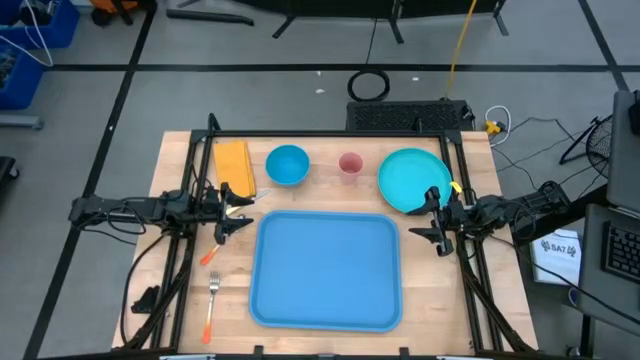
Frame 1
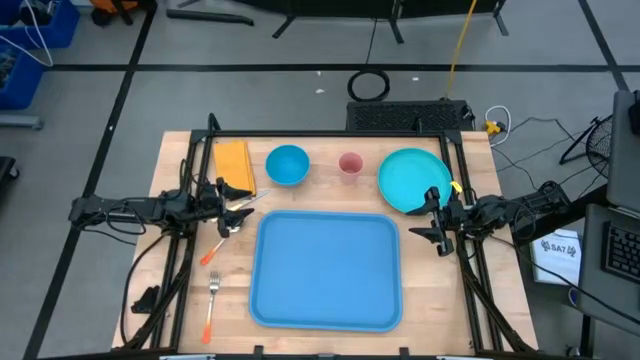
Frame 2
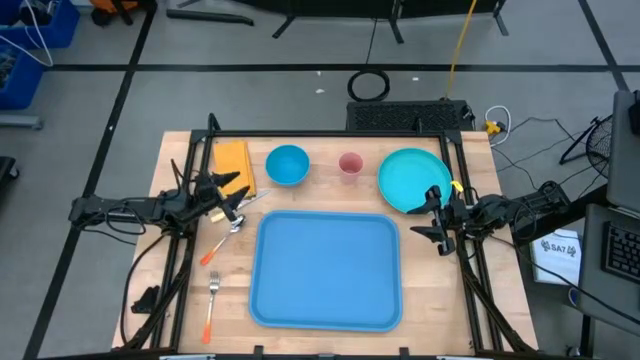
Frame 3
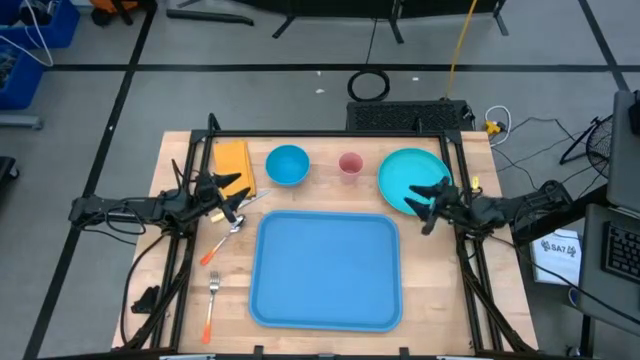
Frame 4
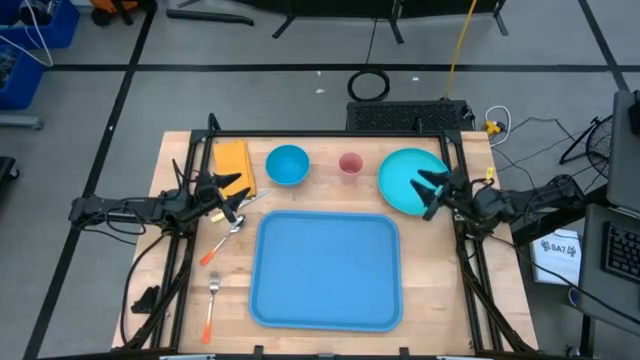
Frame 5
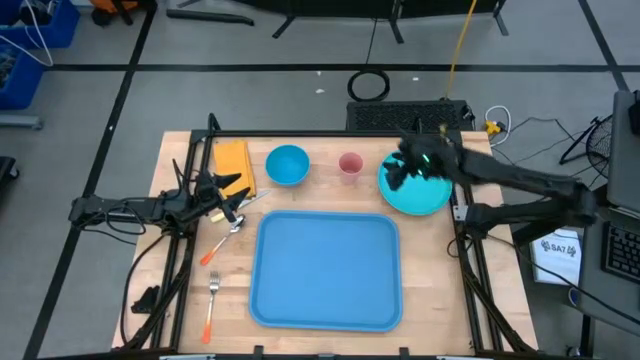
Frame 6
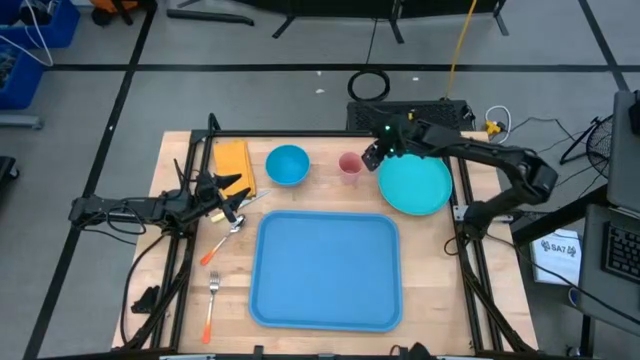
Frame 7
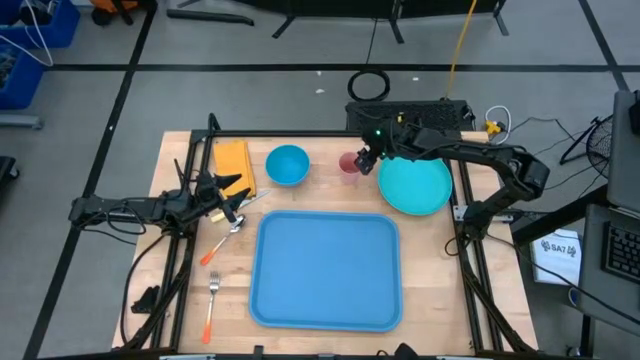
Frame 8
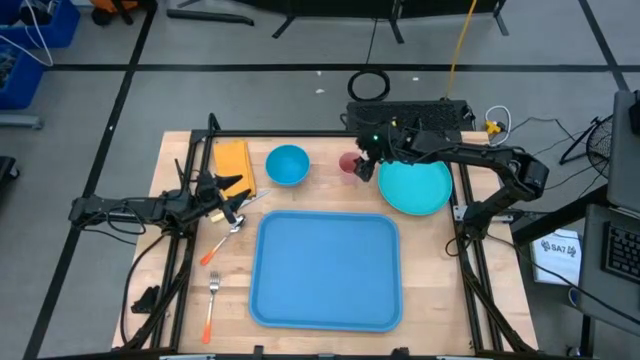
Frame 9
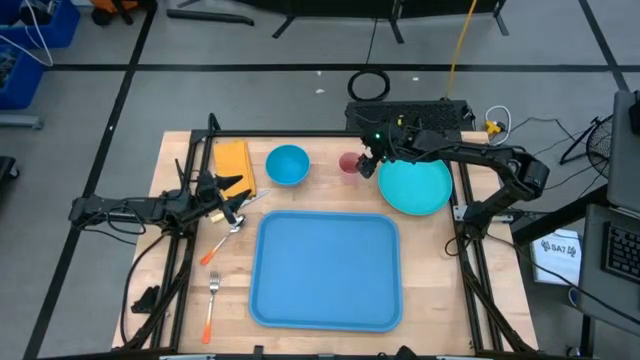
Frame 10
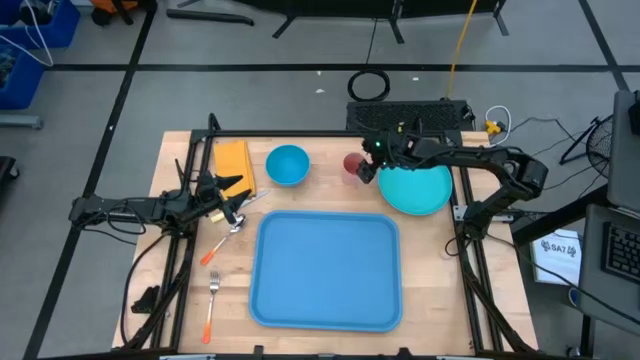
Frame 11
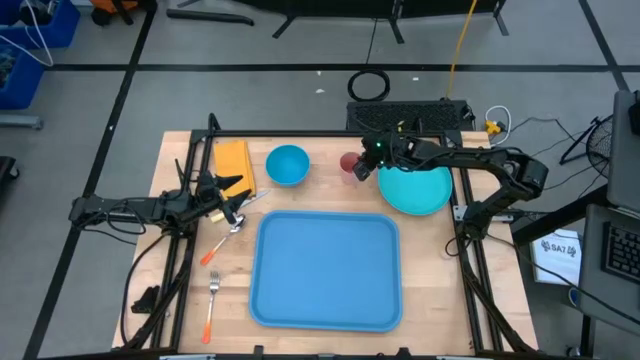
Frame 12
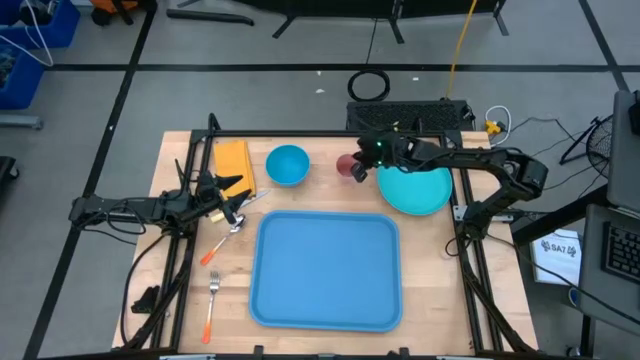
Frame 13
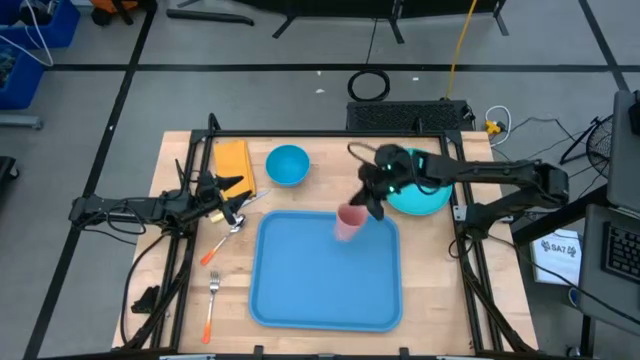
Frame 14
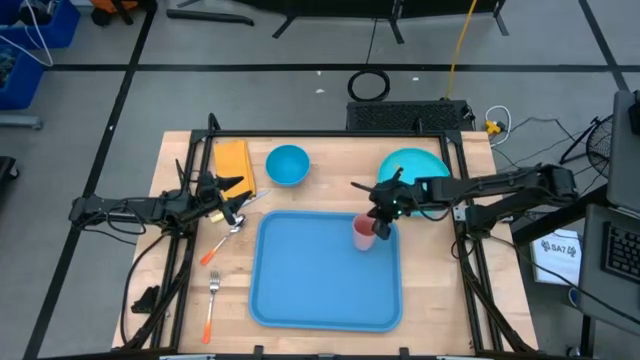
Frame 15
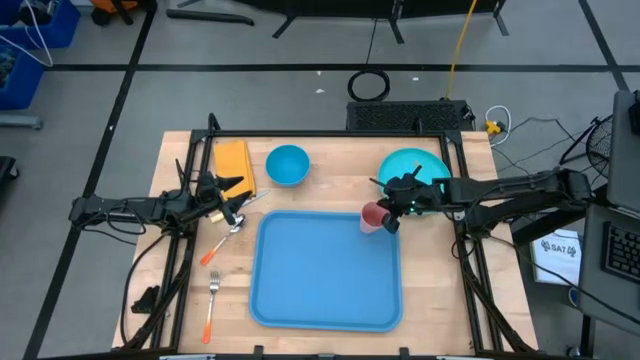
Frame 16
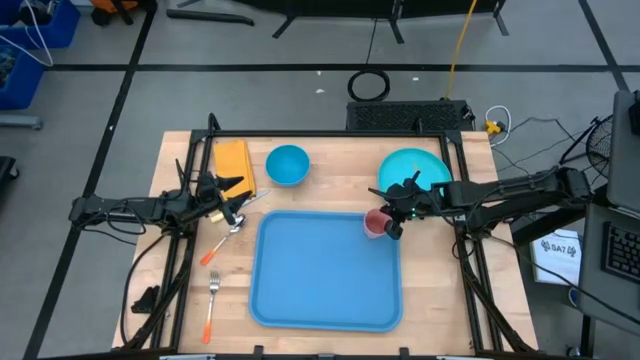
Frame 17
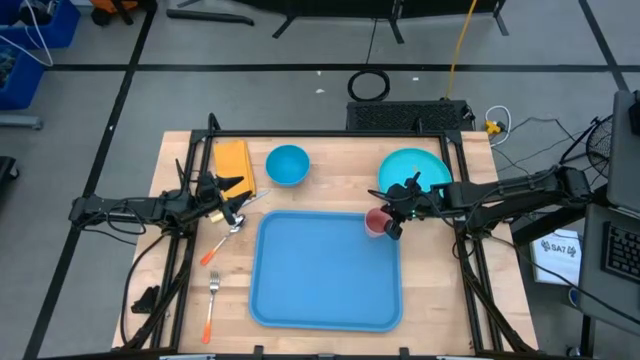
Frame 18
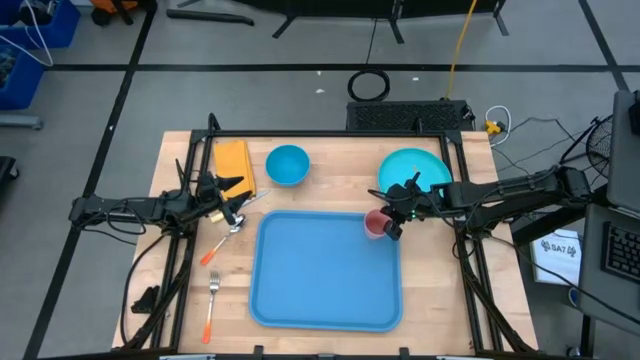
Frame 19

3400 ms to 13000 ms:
Task: Set up tray
Put the pink cup on the blue tray

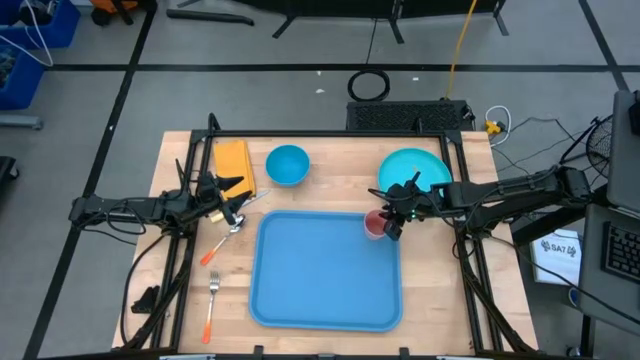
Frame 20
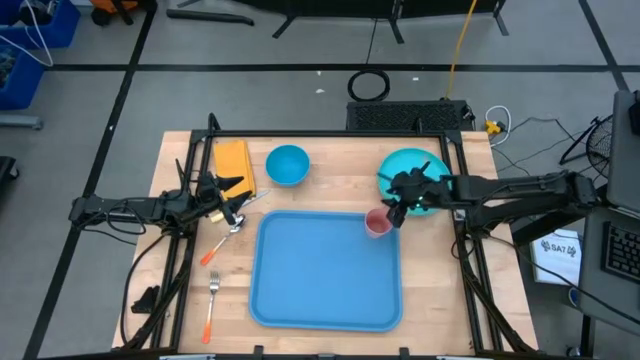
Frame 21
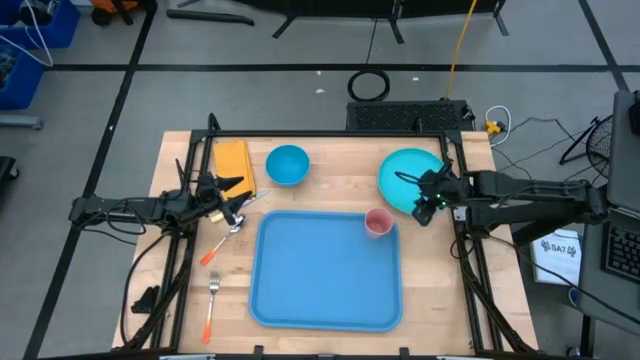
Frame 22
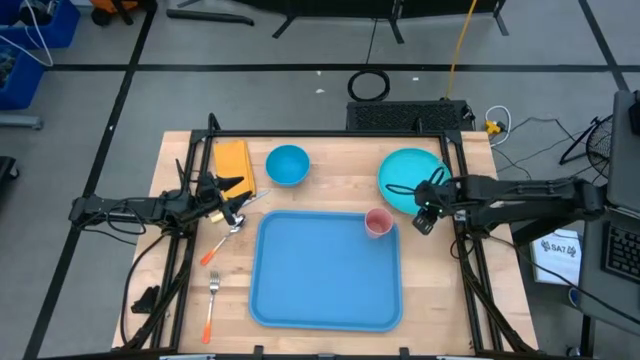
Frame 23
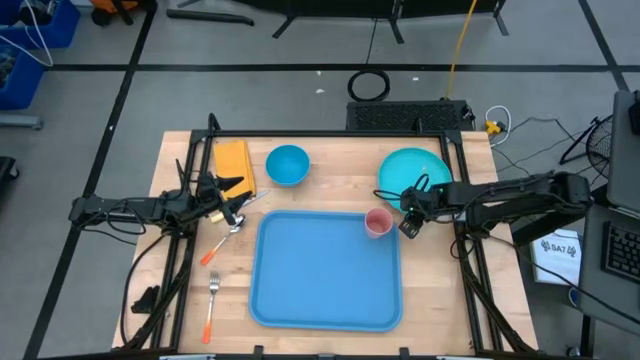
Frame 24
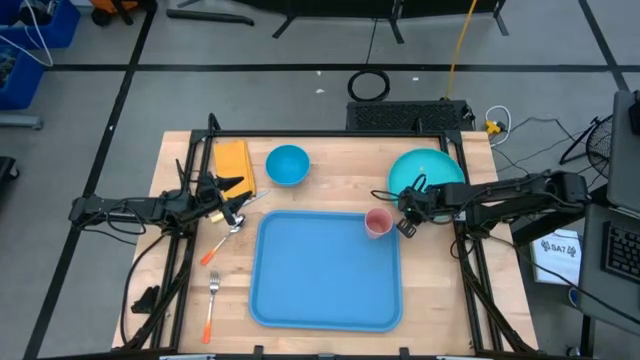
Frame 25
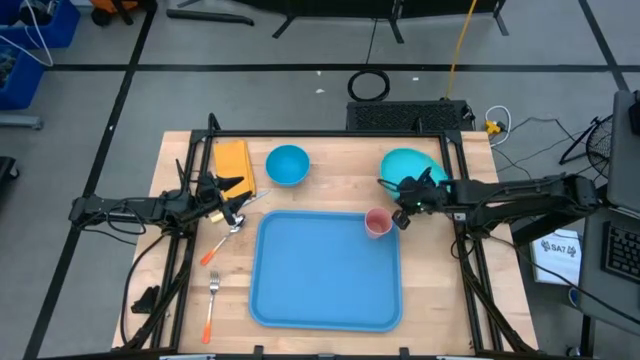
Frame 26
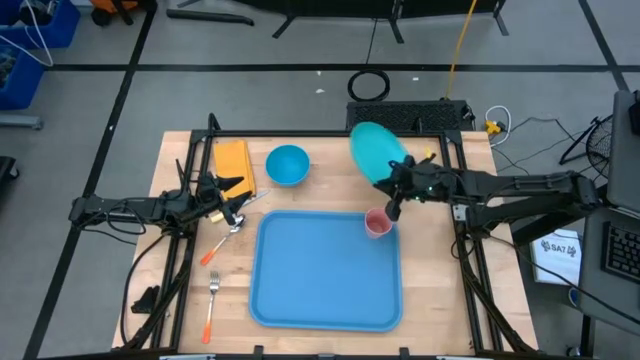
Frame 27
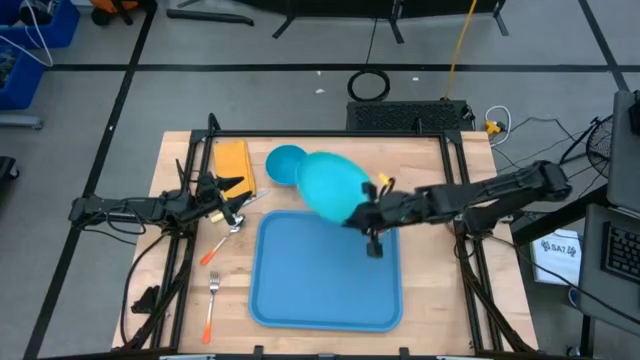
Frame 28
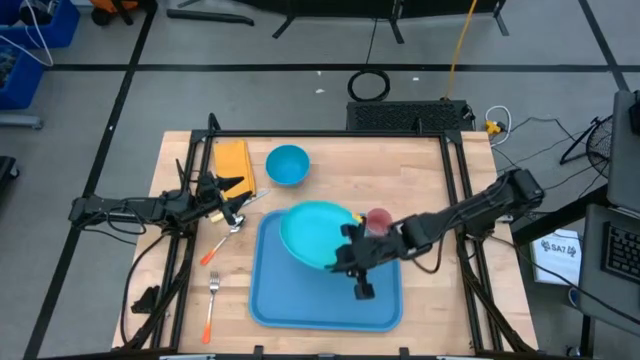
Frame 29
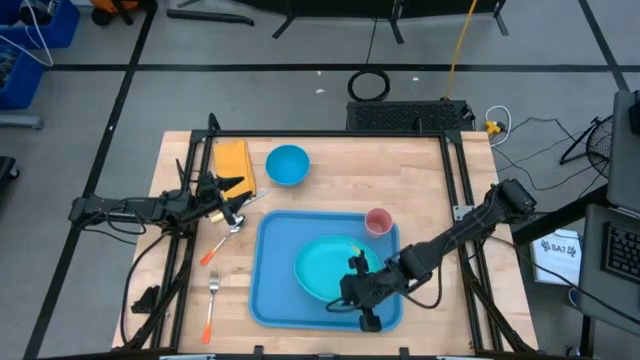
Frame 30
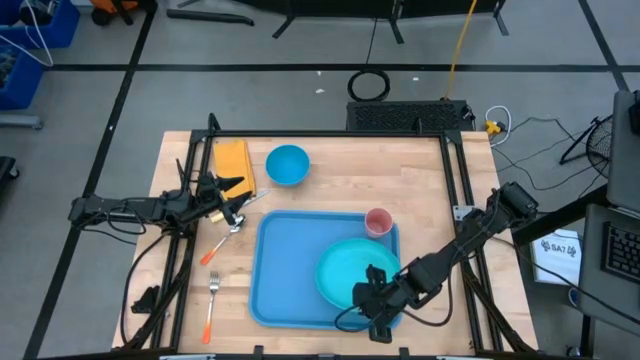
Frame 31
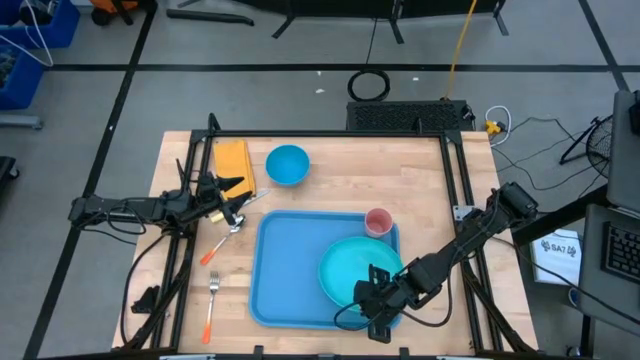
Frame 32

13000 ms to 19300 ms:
Put the green plate on the blue tray

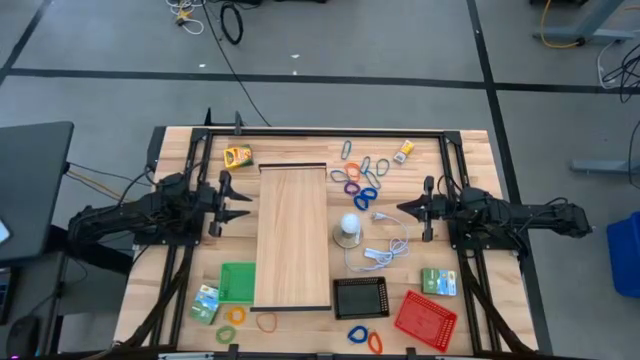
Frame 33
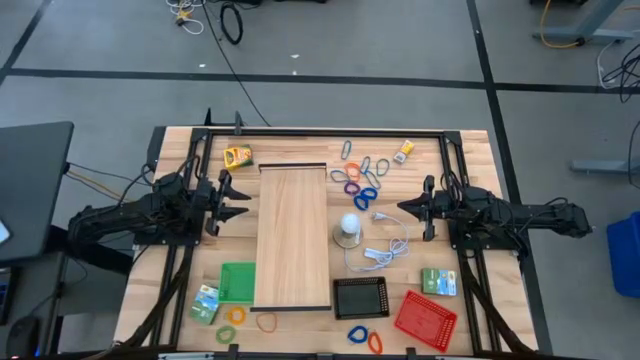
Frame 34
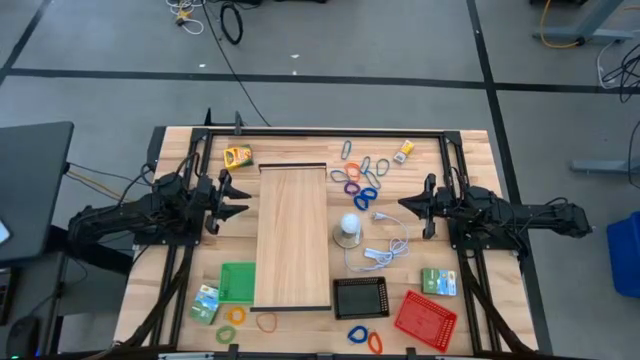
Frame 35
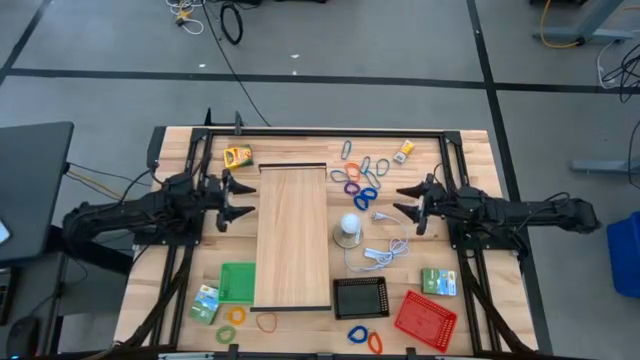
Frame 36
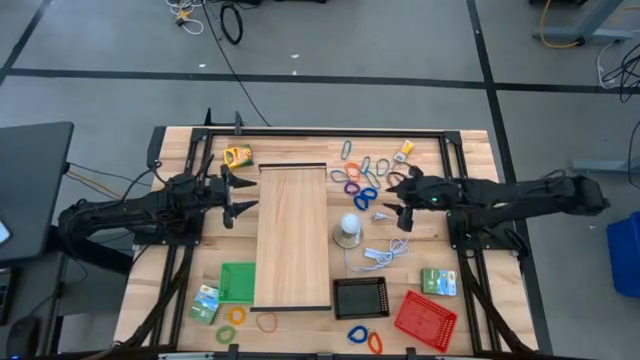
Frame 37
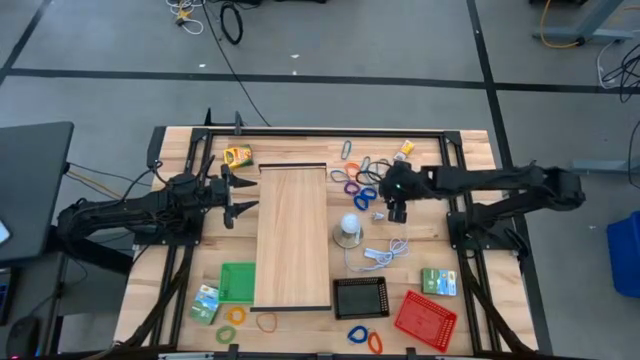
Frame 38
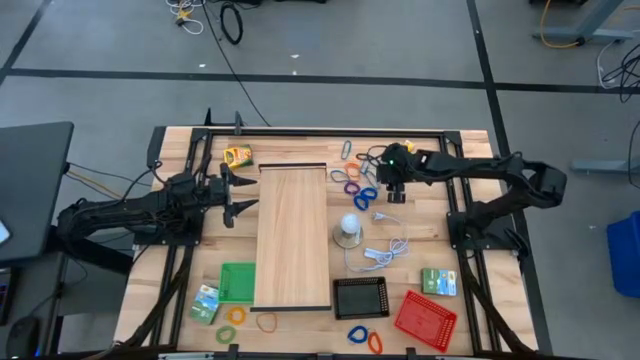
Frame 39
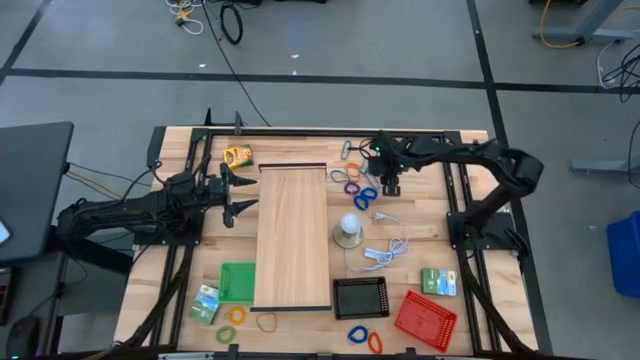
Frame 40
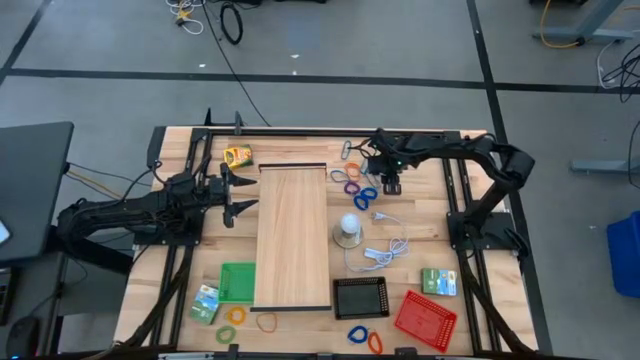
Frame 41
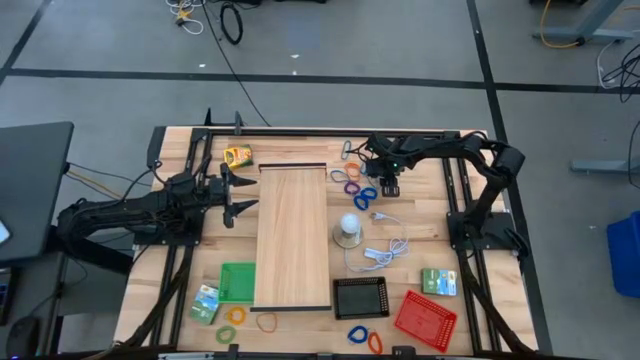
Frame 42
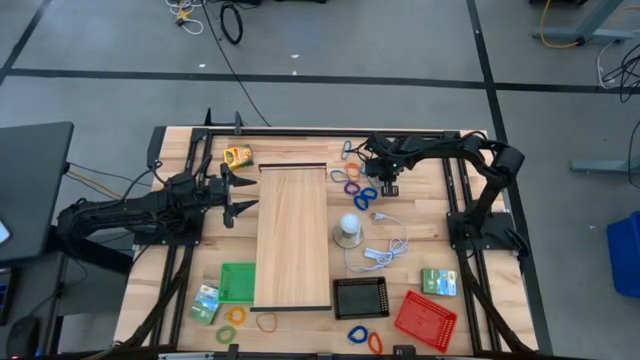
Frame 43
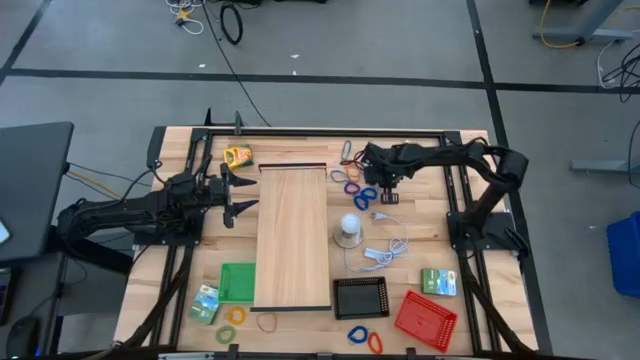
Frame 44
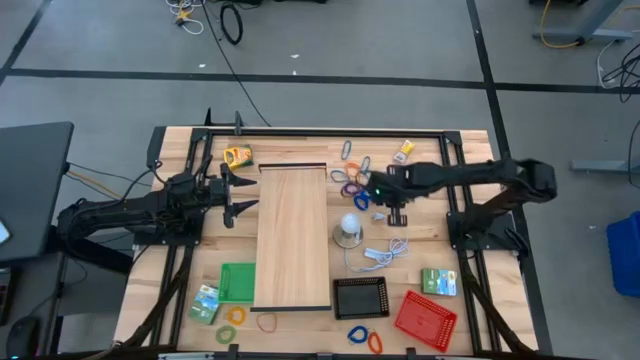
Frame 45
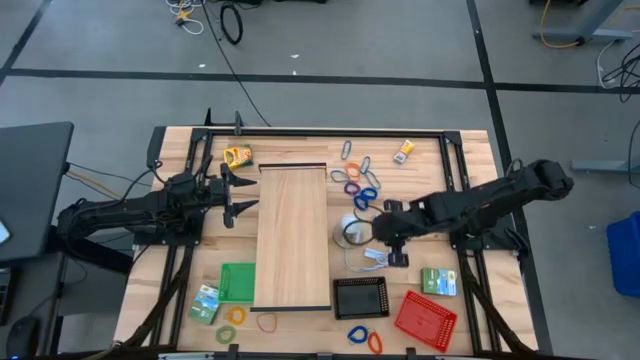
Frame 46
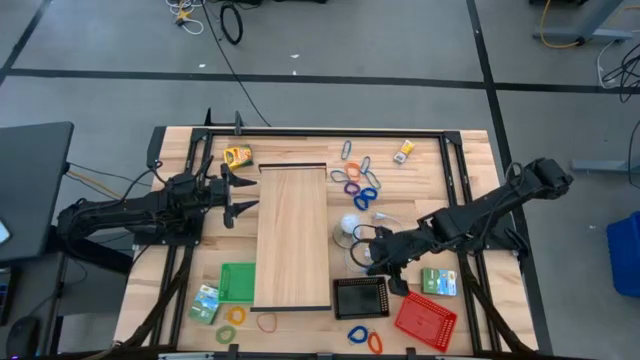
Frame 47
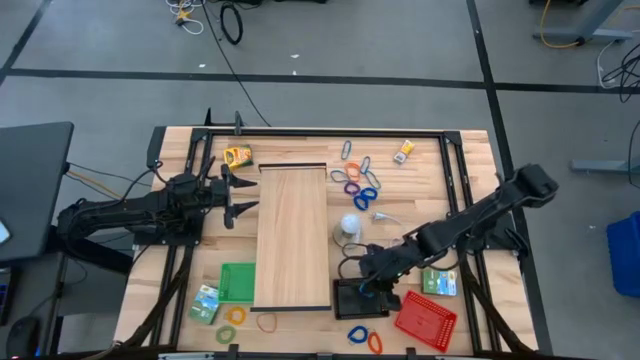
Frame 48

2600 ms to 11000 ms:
Task: Pick & Place Office Desk Supplies
Put the blue rubber band into the black bin
